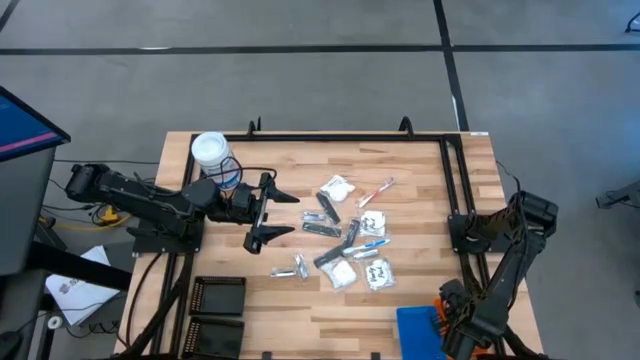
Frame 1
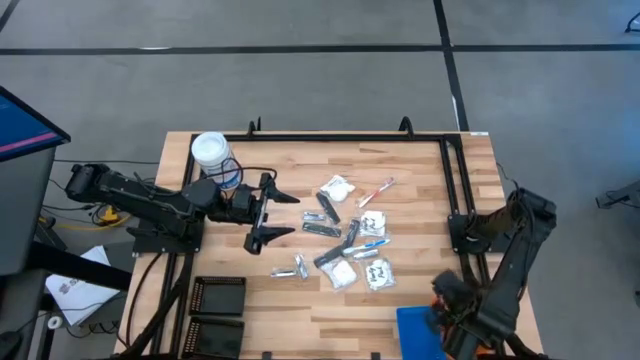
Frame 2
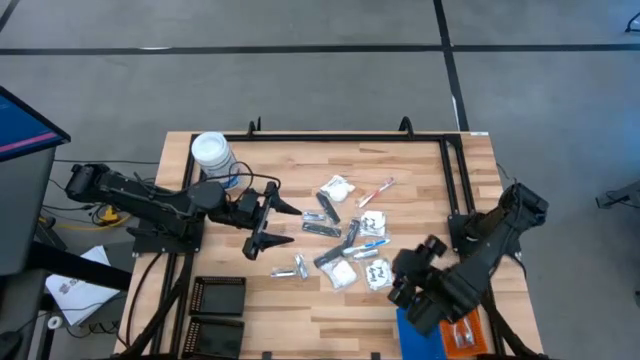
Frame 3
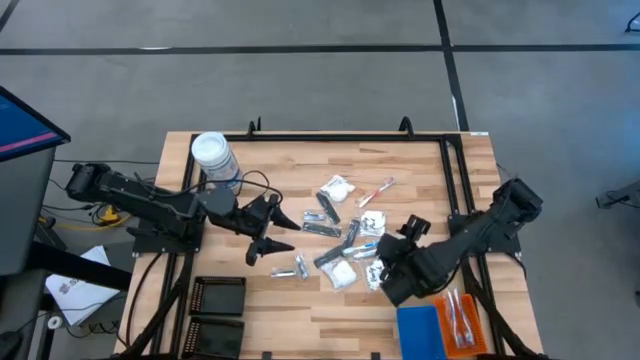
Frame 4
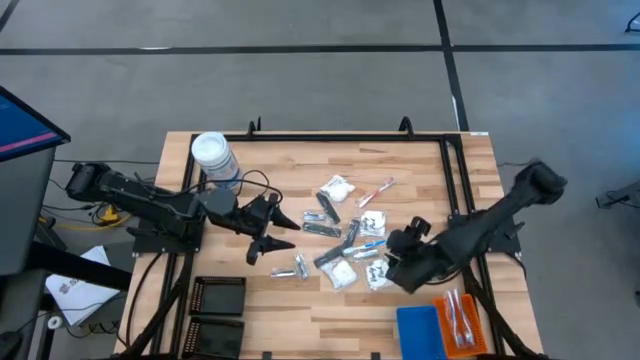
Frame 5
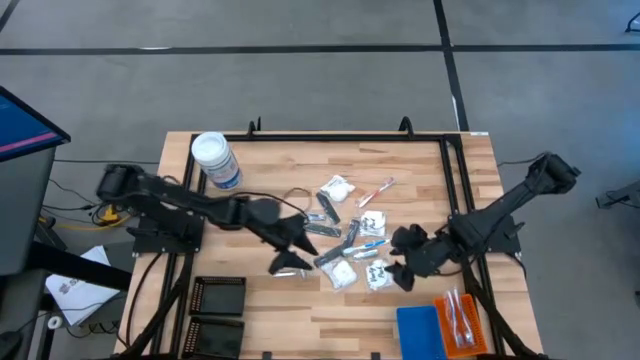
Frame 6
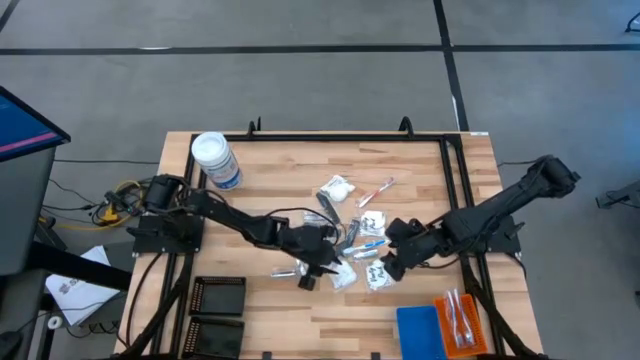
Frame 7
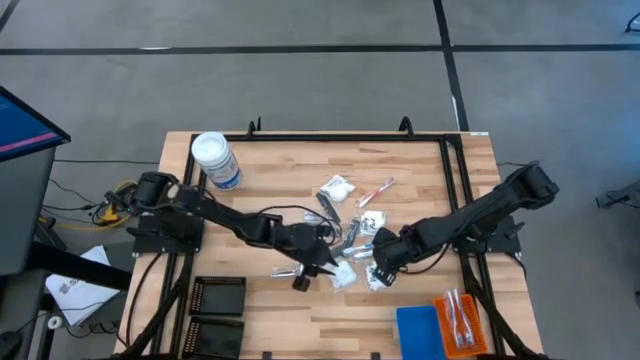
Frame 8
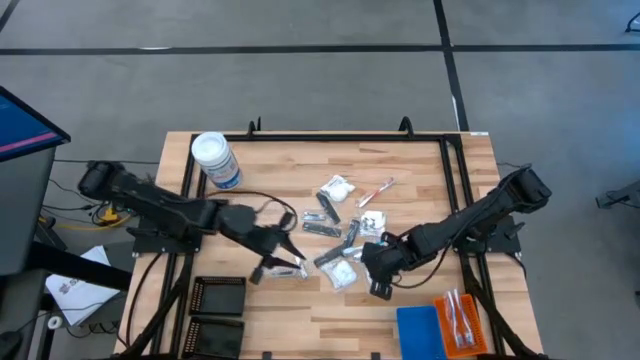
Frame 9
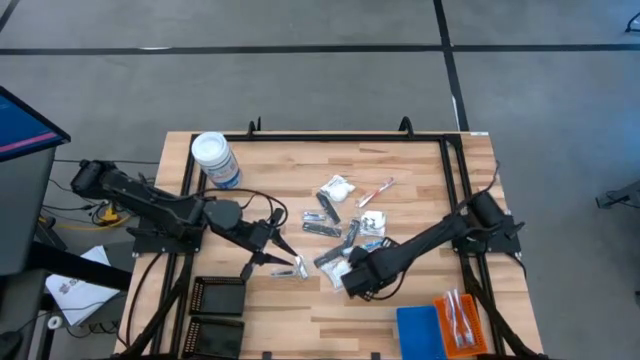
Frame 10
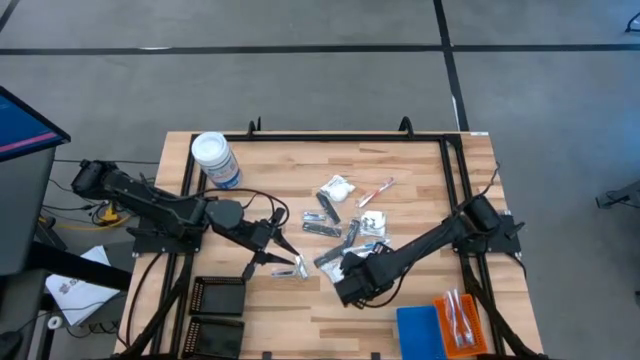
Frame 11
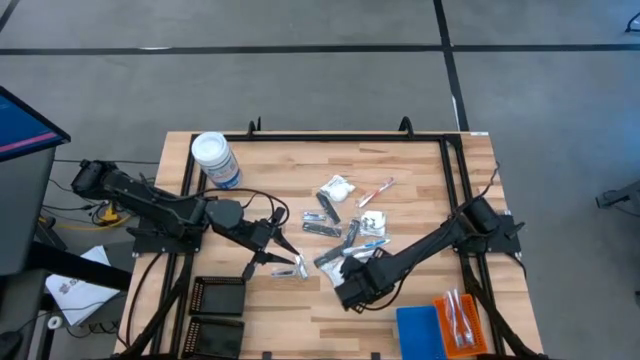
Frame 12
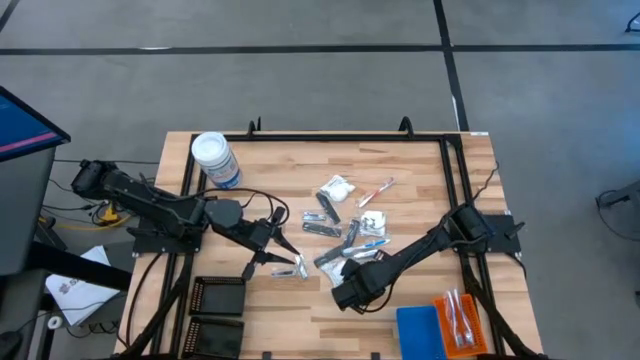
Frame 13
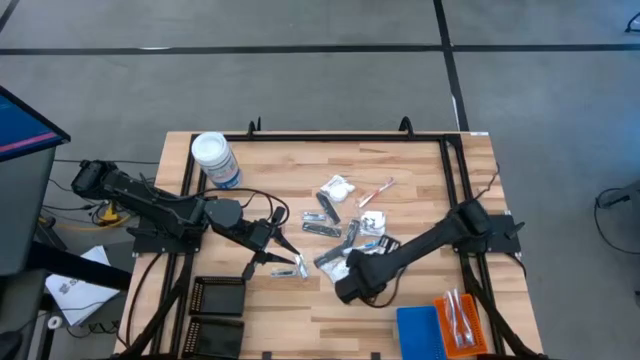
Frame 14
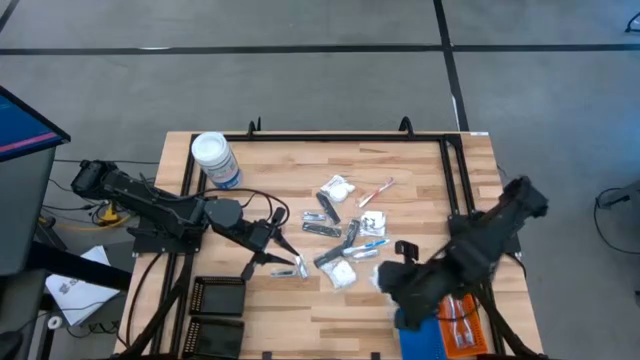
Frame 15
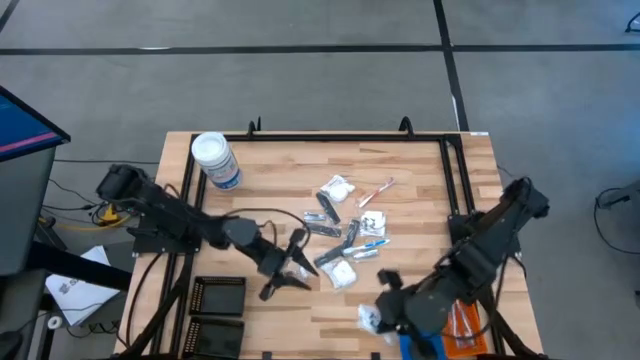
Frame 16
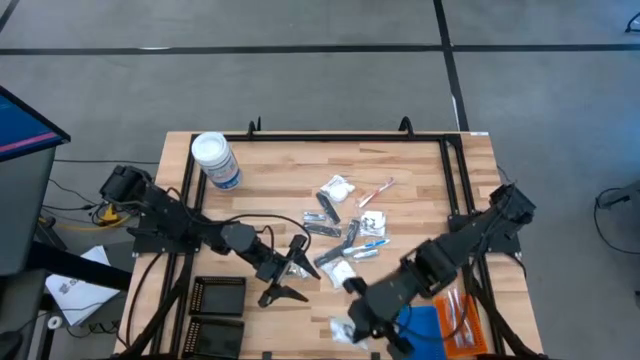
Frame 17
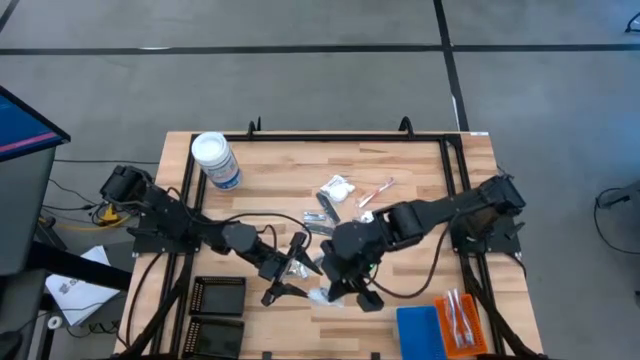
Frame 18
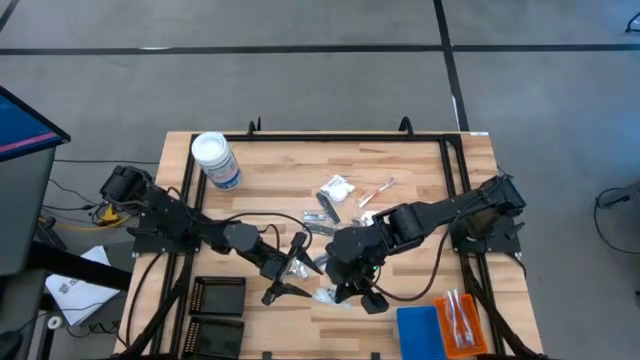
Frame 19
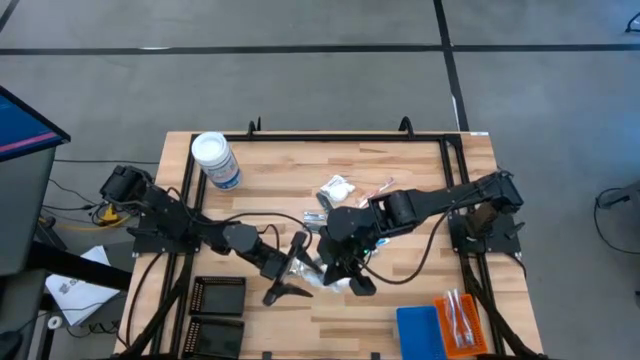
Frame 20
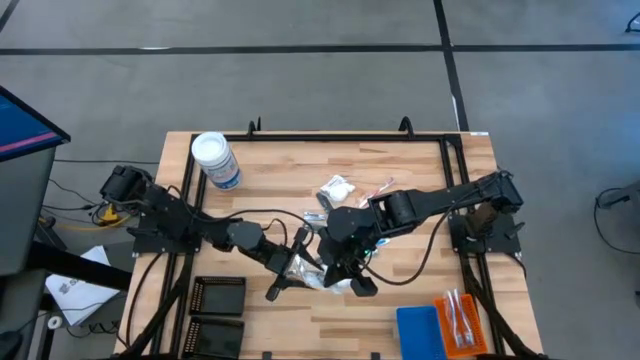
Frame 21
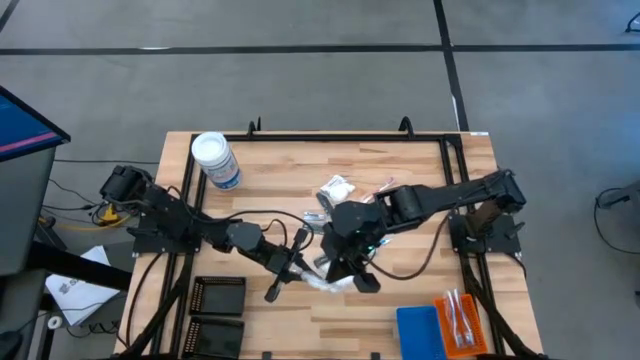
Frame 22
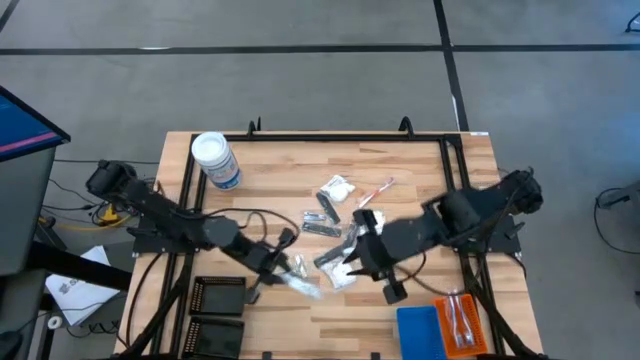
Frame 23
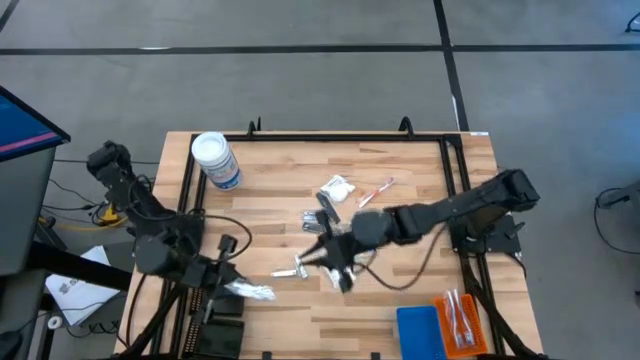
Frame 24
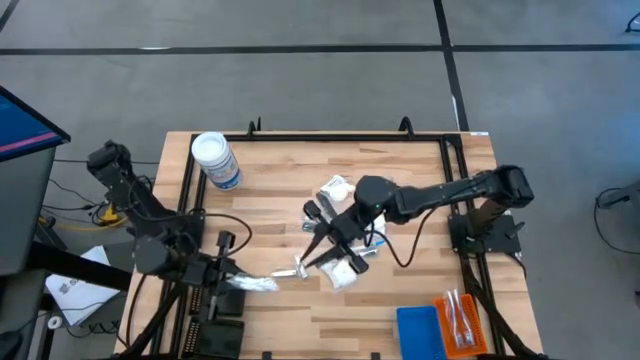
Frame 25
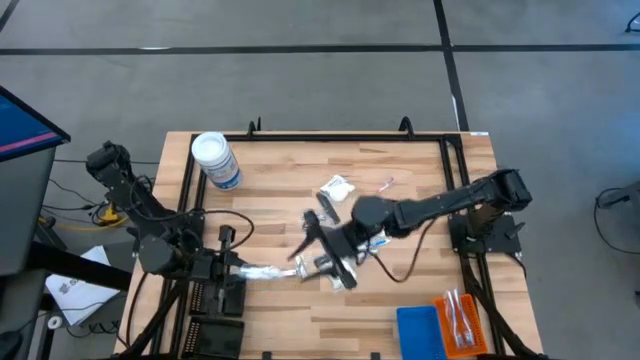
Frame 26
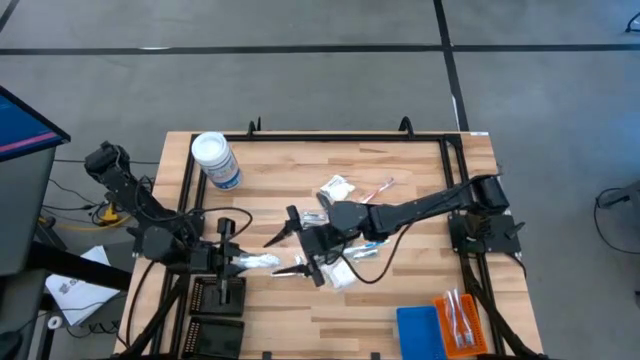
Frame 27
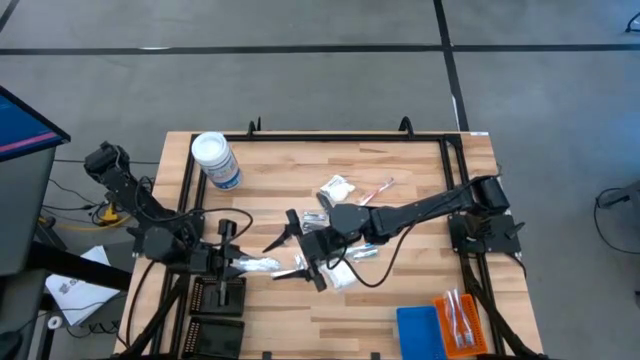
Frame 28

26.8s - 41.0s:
Task: Pick & Place Travel size toiletries
Put the vanity pack into the bottom black bin

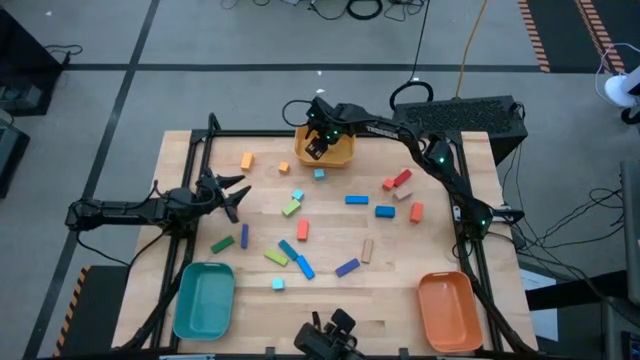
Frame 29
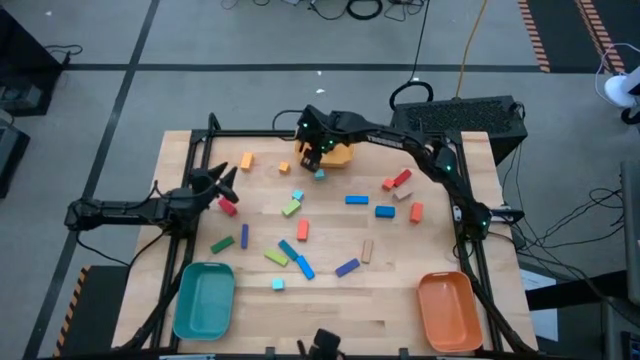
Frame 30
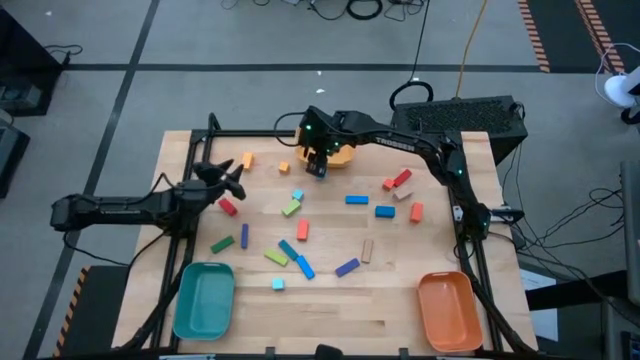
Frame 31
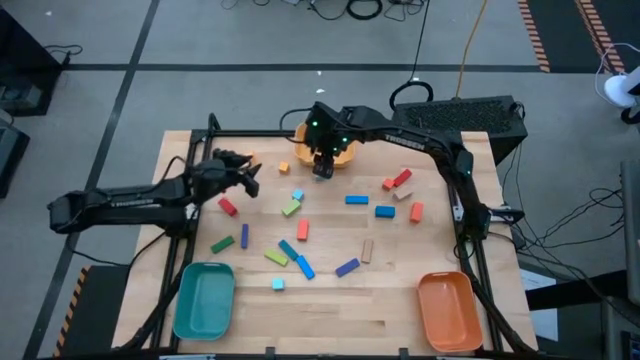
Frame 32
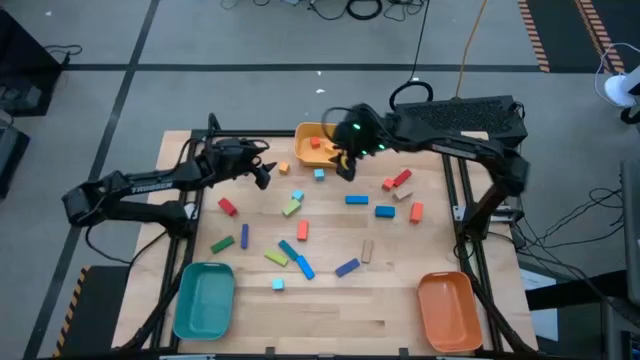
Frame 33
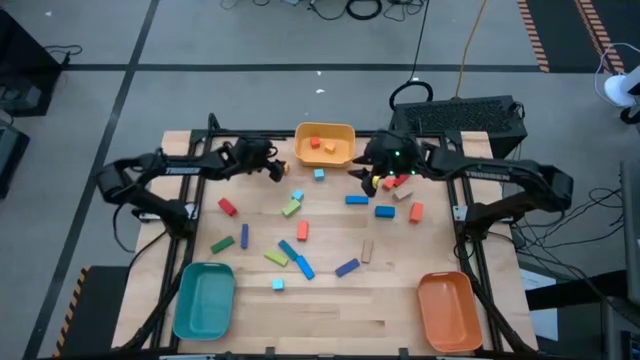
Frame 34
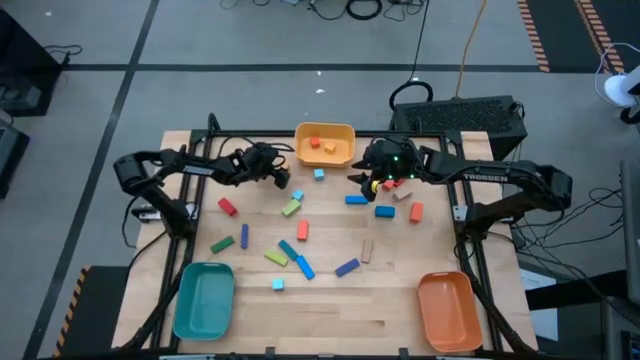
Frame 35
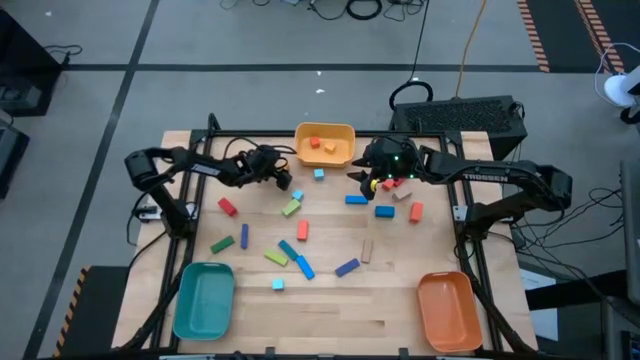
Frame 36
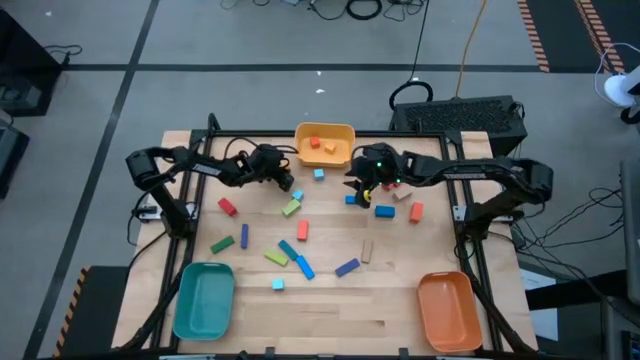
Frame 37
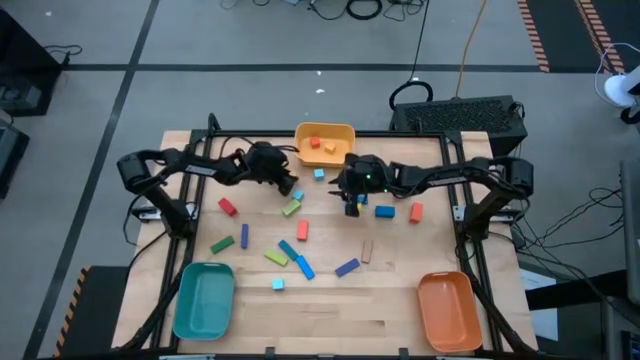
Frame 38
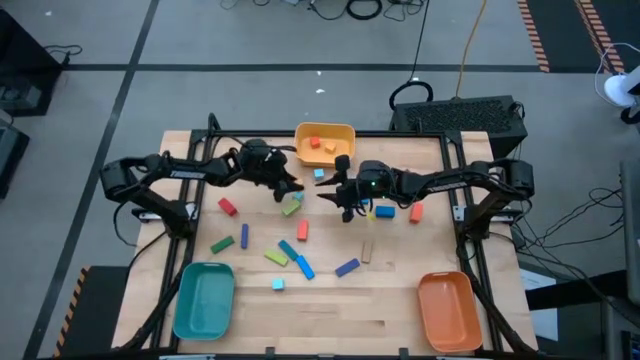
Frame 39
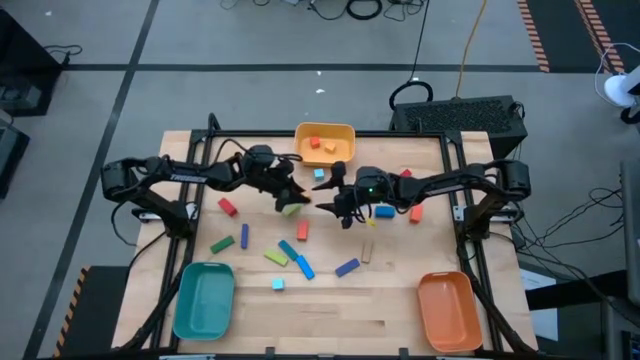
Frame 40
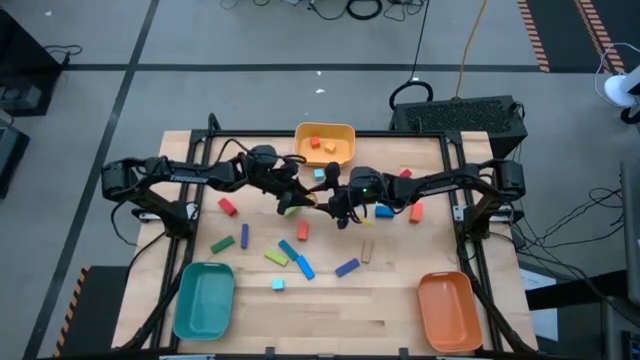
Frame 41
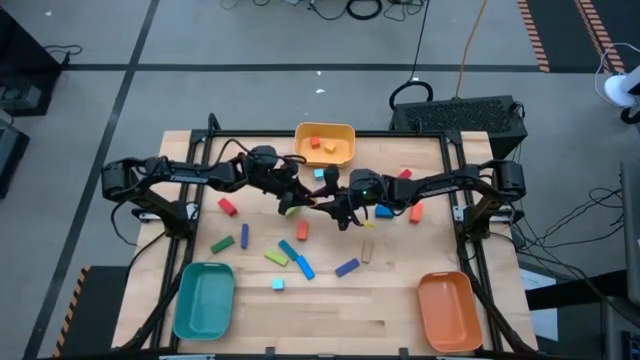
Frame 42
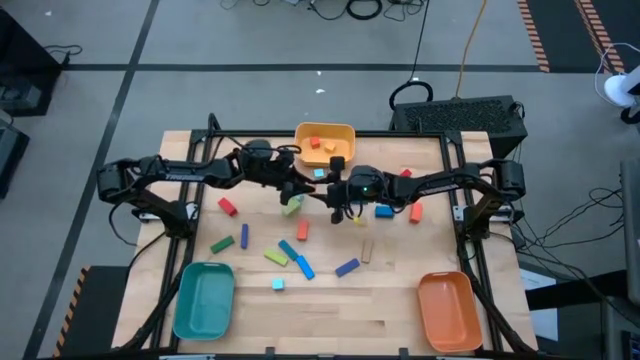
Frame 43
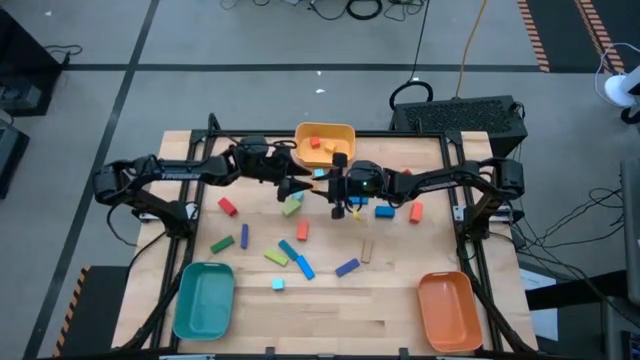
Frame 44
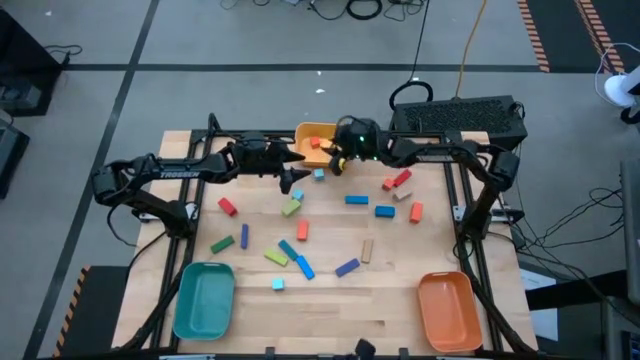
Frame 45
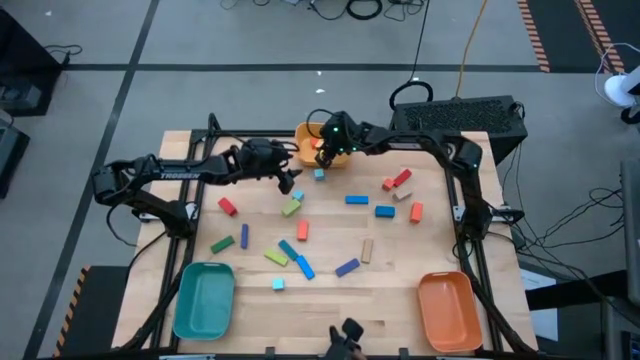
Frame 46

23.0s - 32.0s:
Task: Sort blocks by size
Put the yellow square block into the yellow bin
